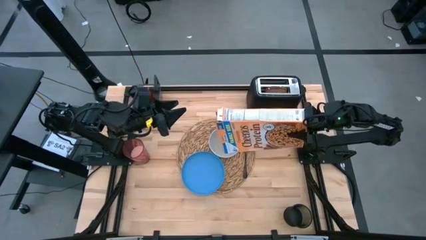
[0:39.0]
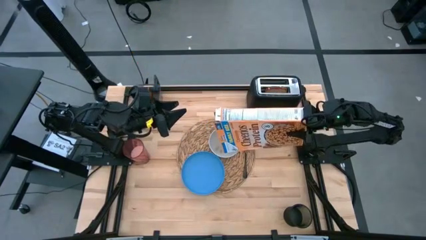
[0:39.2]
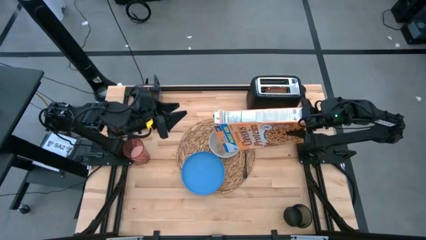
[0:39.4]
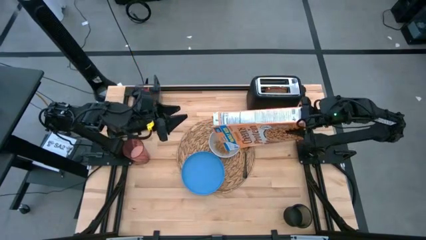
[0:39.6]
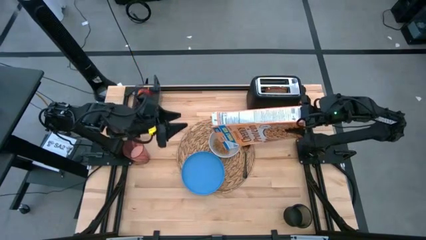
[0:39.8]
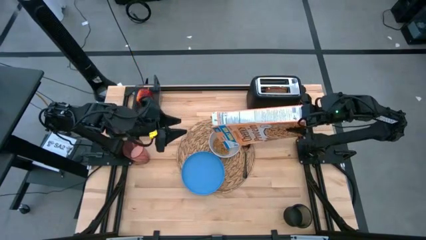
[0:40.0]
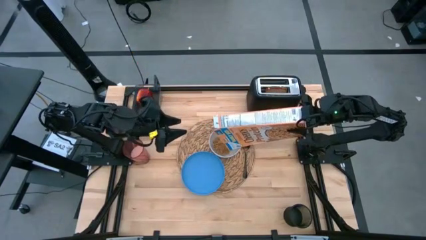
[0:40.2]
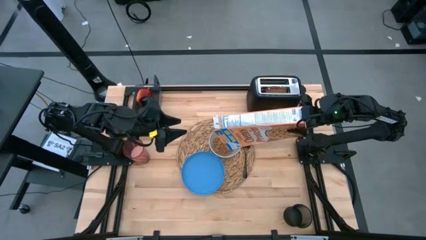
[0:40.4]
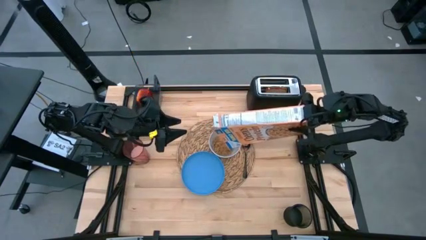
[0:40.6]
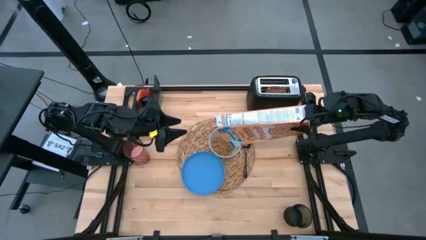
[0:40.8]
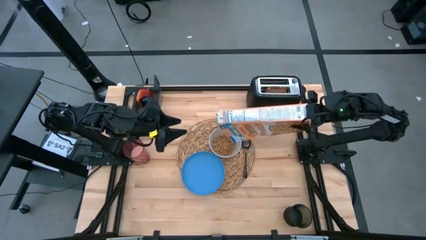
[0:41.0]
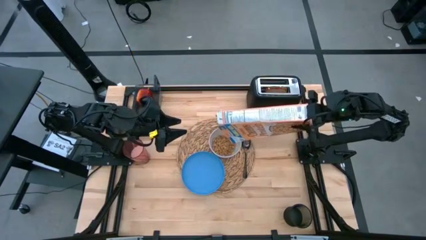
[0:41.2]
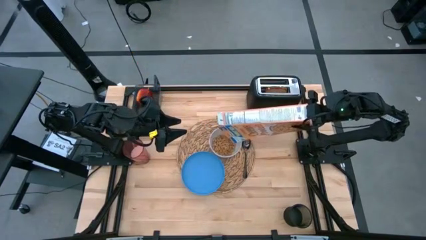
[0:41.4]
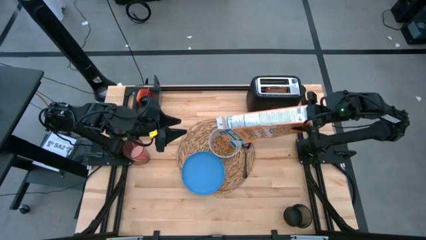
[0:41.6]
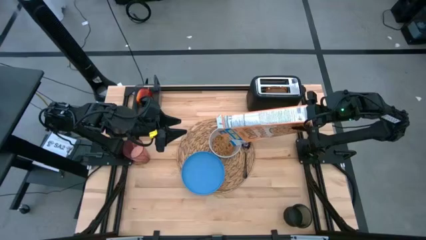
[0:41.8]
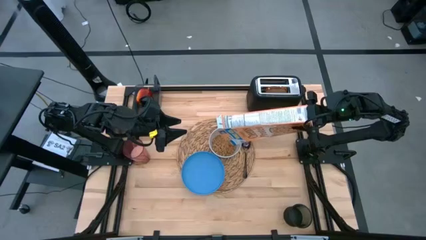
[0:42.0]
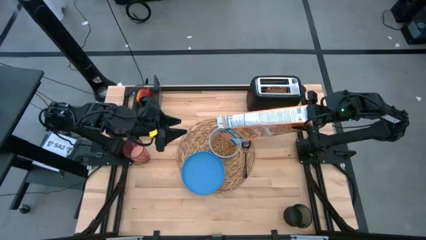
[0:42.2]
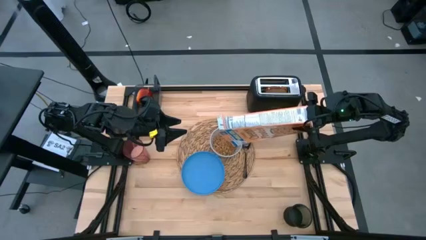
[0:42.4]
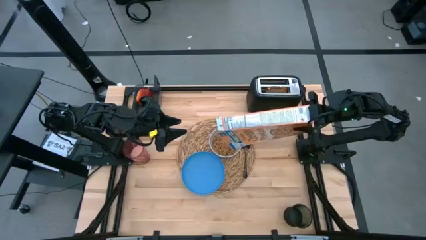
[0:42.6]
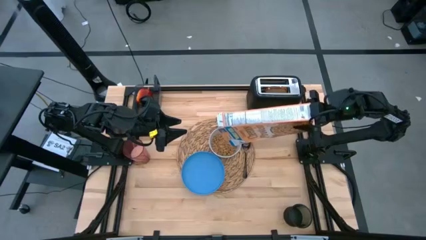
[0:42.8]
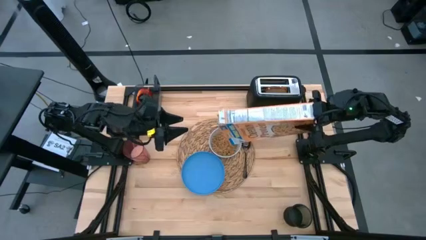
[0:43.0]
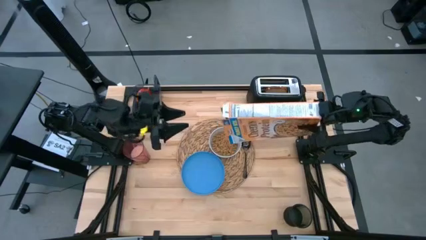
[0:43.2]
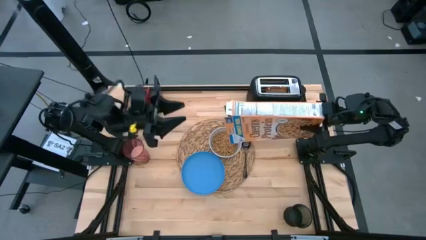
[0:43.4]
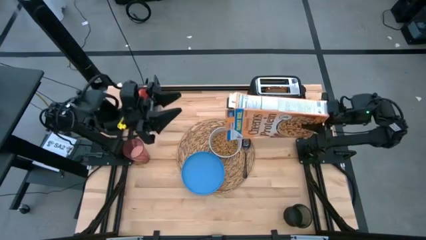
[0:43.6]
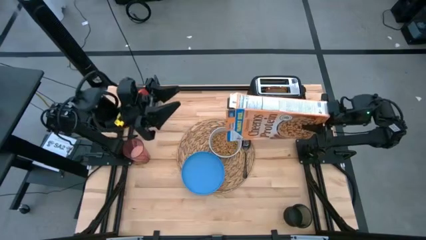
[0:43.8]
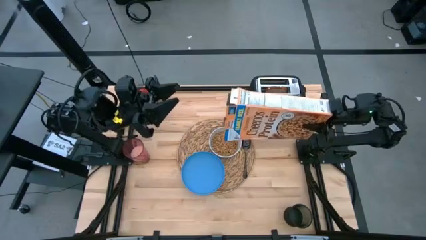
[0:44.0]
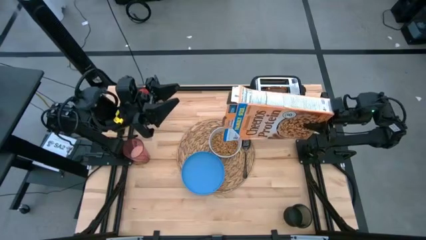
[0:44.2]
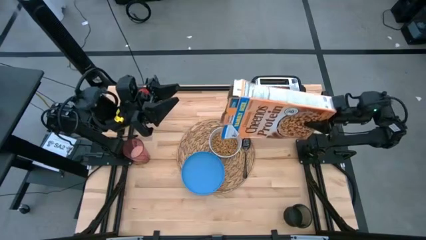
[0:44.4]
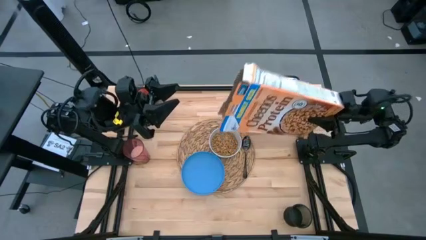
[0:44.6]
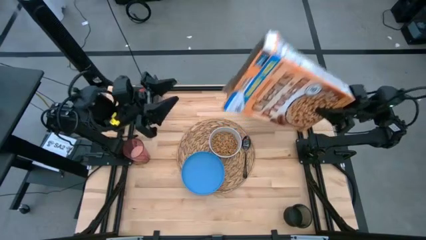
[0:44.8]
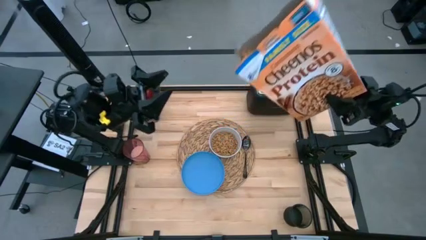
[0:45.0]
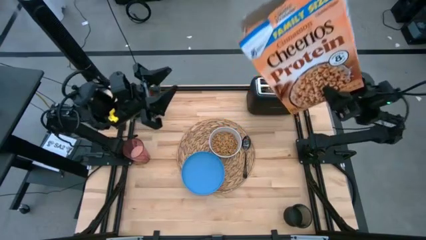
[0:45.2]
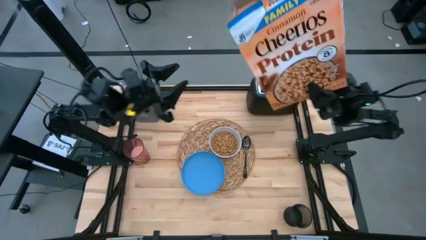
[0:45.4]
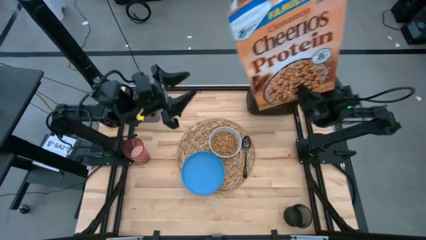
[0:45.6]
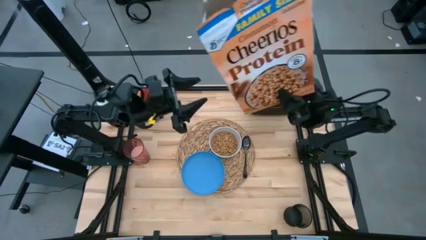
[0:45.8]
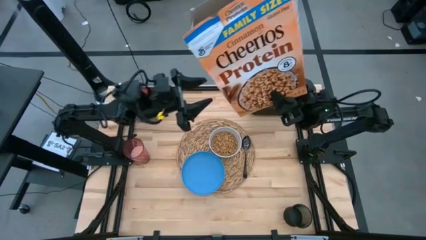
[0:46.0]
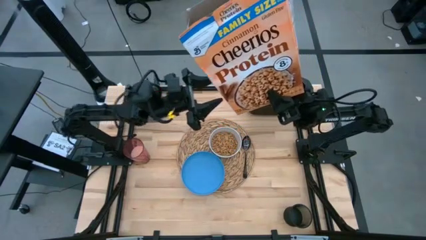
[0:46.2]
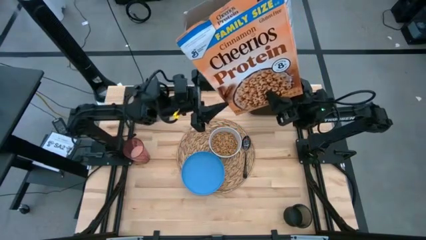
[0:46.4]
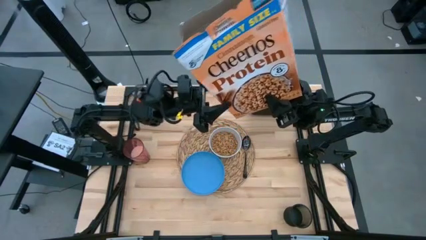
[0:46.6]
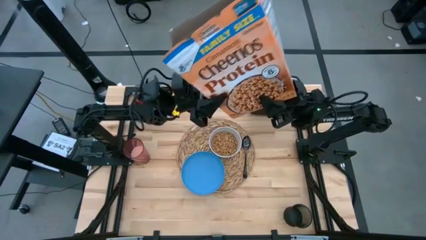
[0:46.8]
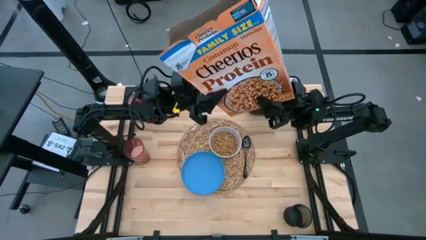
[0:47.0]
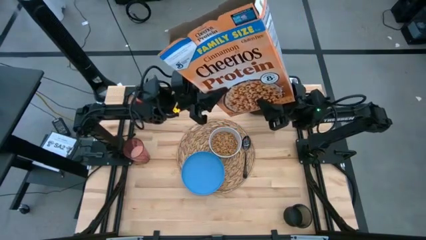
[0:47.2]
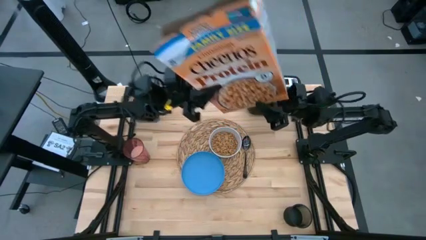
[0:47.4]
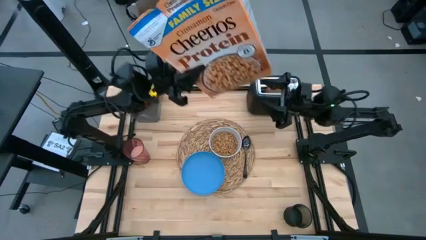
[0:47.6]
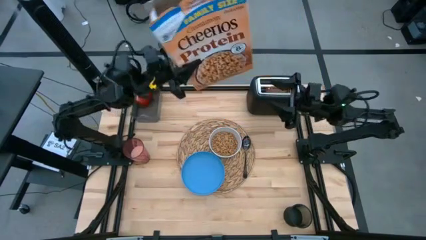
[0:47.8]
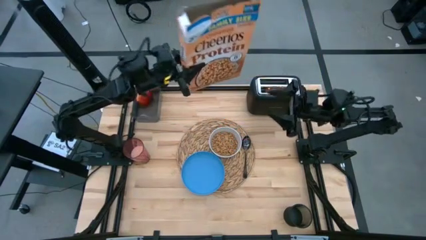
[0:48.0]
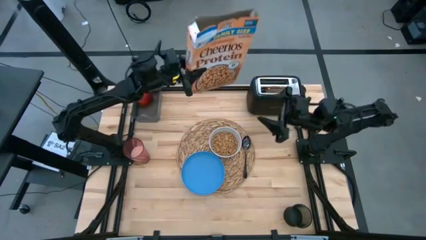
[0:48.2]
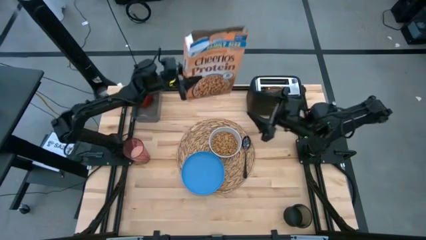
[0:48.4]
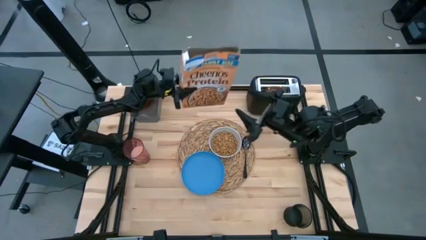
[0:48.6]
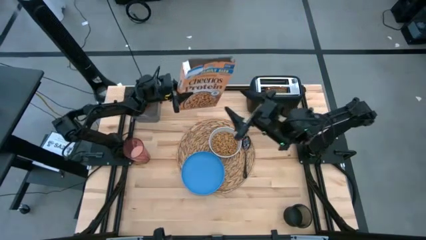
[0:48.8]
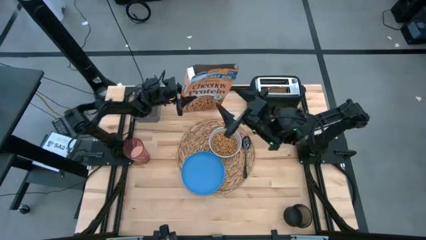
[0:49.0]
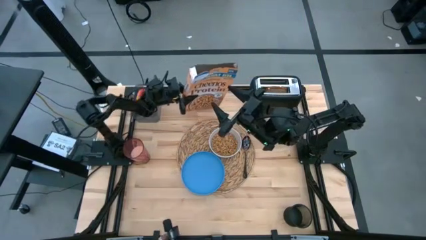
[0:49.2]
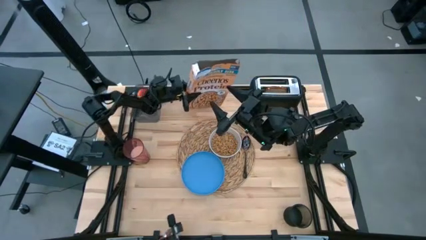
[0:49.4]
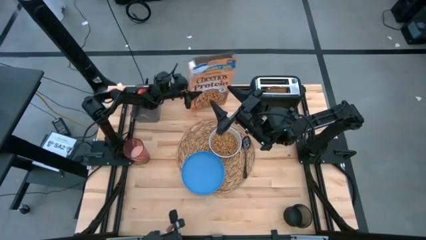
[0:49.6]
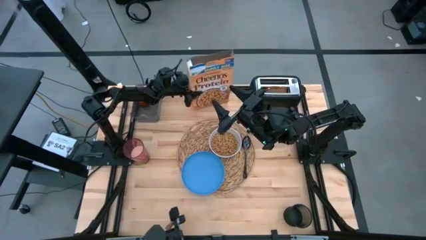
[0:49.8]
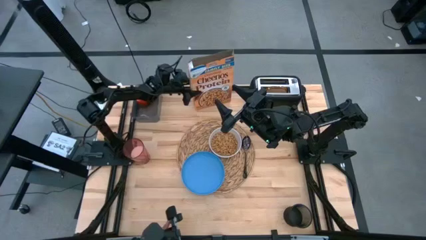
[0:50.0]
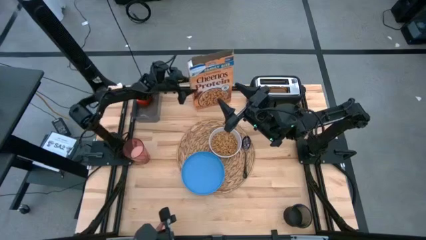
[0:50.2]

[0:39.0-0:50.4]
Task: Arrange a breakfast setting
Pour the cereal into the white bowl

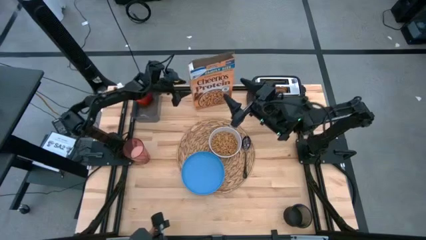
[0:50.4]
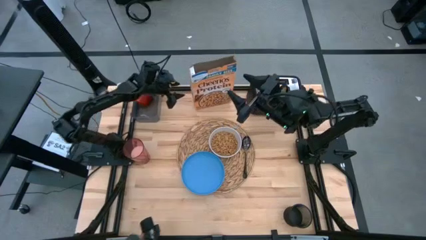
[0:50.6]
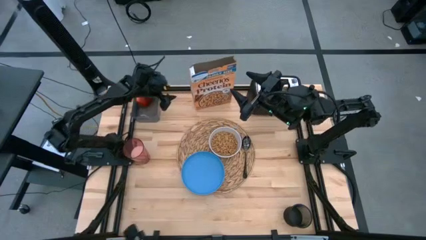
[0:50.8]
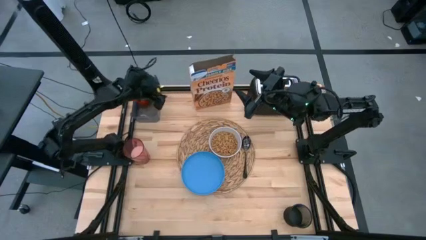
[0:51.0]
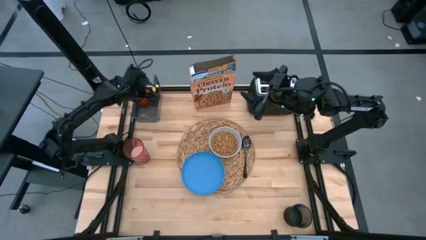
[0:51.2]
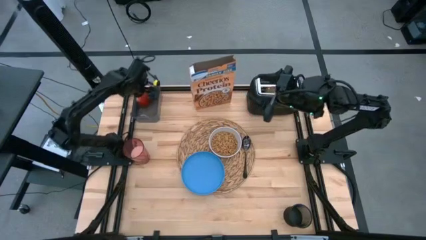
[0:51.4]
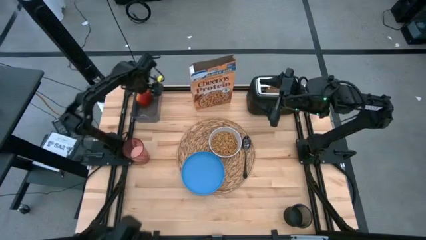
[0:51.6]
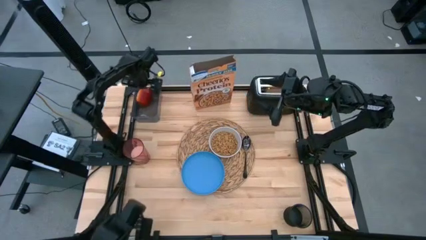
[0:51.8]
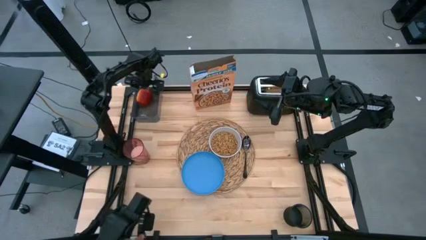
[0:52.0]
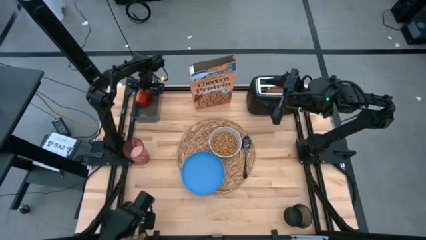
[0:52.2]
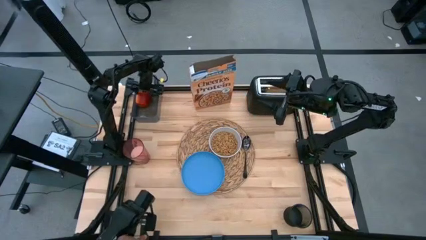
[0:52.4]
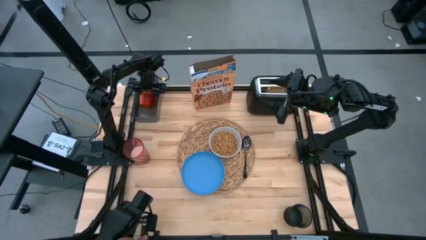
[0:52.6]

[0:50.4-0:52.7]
Put the red apple on the brown table mat
